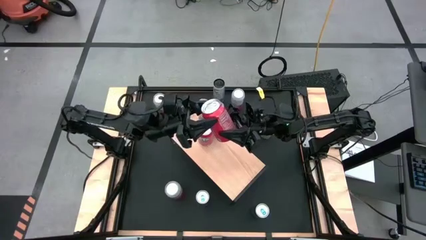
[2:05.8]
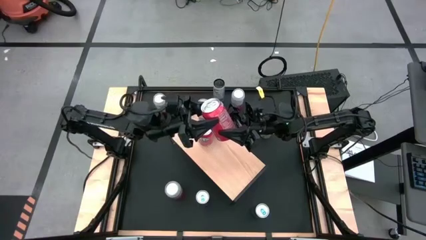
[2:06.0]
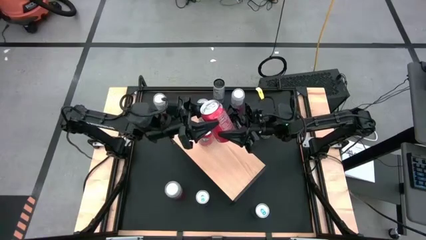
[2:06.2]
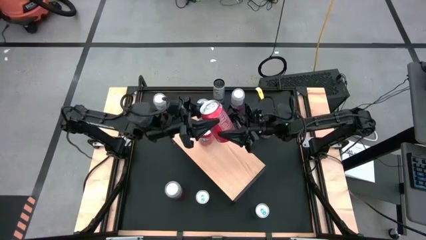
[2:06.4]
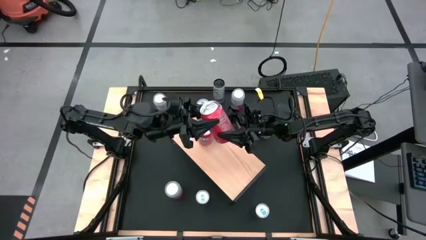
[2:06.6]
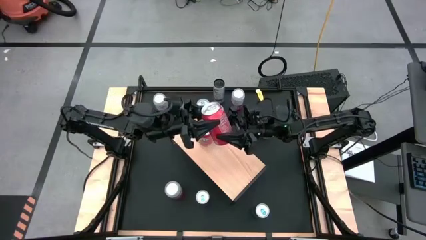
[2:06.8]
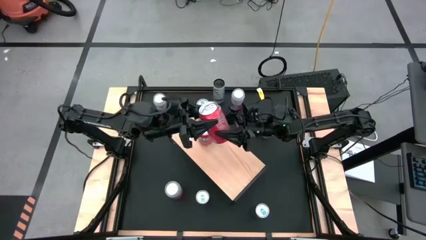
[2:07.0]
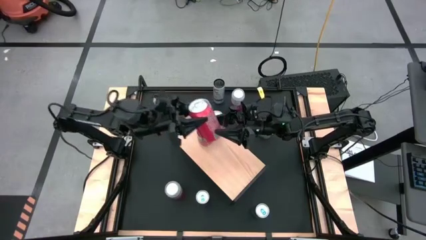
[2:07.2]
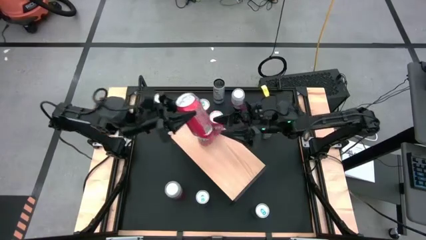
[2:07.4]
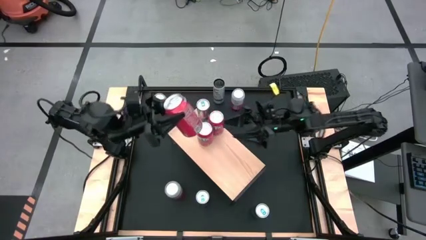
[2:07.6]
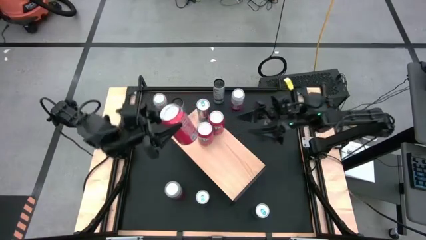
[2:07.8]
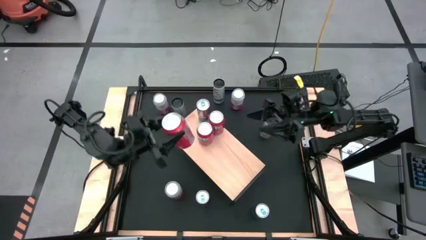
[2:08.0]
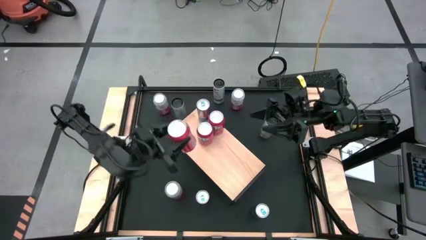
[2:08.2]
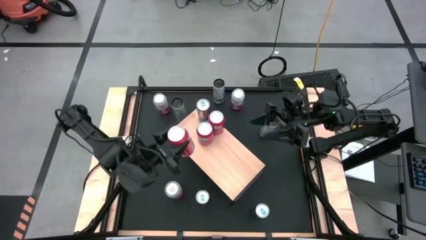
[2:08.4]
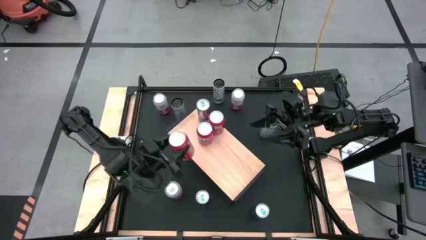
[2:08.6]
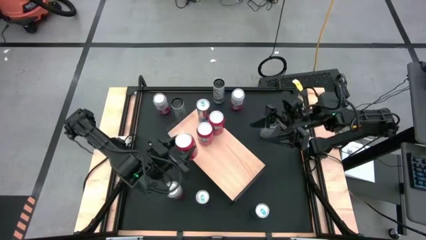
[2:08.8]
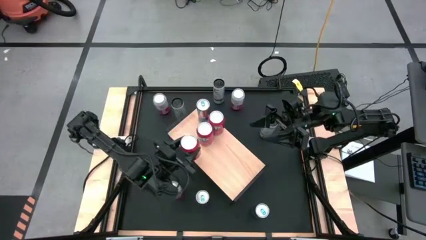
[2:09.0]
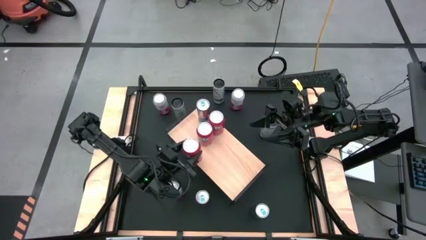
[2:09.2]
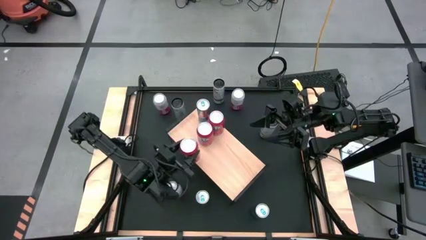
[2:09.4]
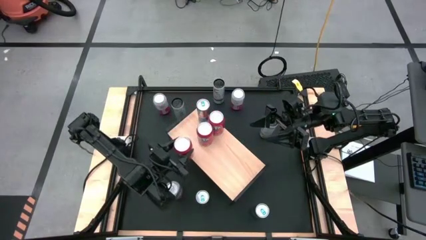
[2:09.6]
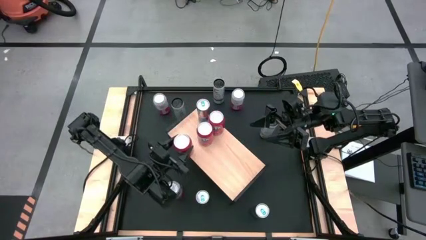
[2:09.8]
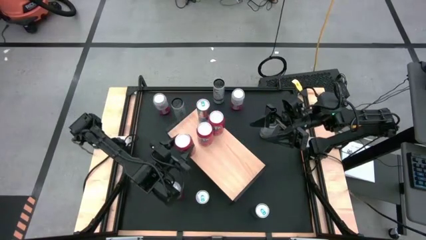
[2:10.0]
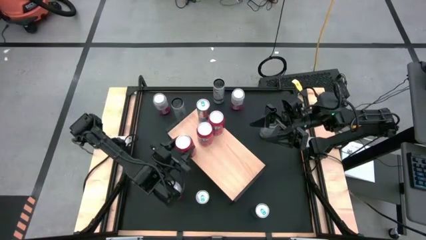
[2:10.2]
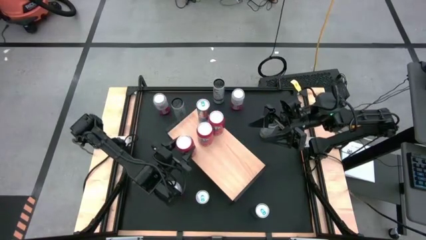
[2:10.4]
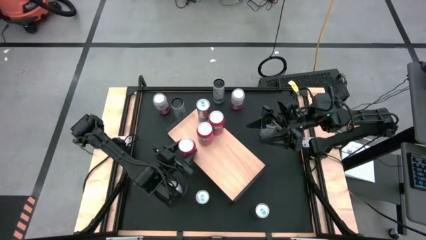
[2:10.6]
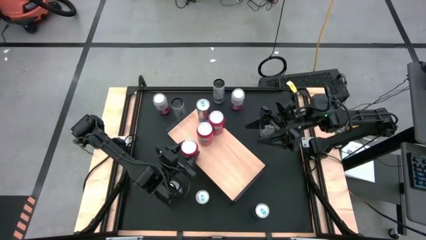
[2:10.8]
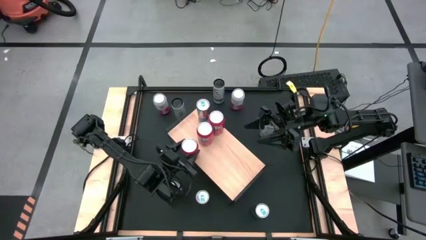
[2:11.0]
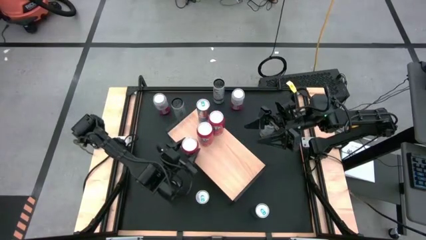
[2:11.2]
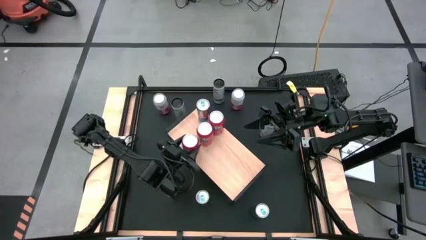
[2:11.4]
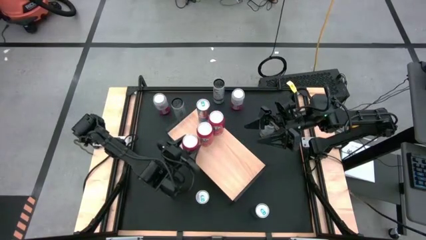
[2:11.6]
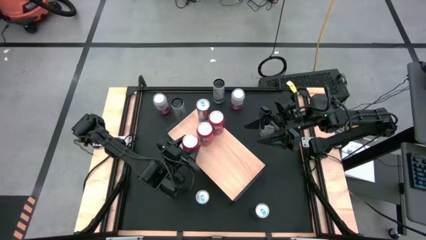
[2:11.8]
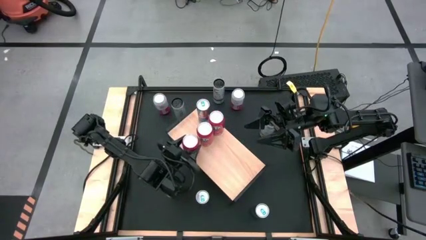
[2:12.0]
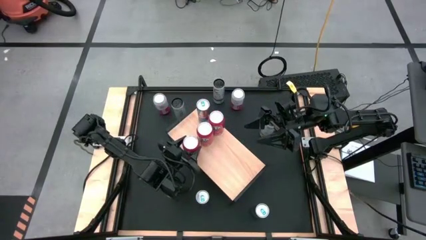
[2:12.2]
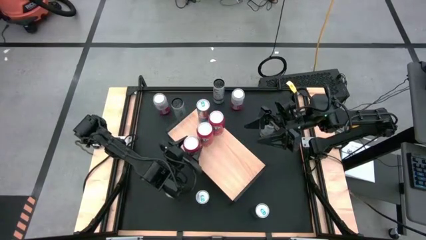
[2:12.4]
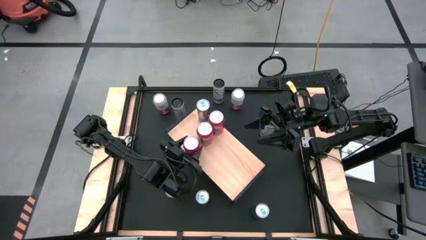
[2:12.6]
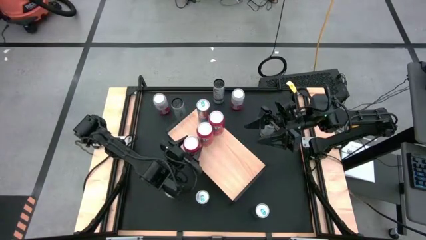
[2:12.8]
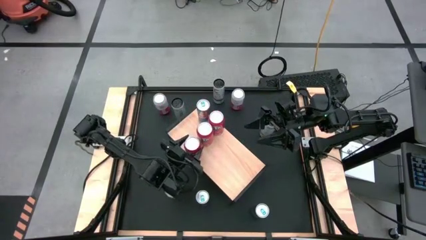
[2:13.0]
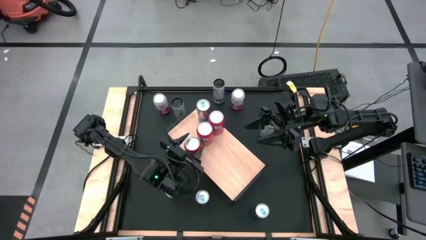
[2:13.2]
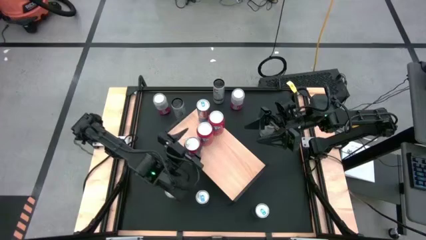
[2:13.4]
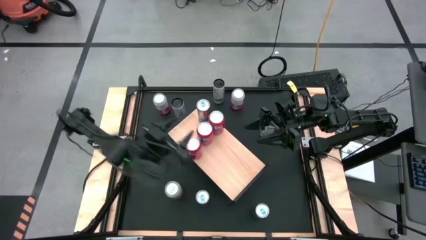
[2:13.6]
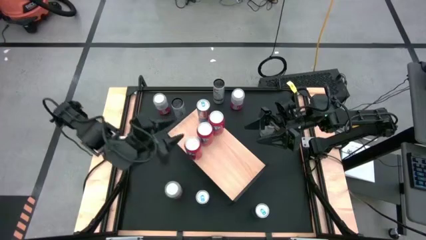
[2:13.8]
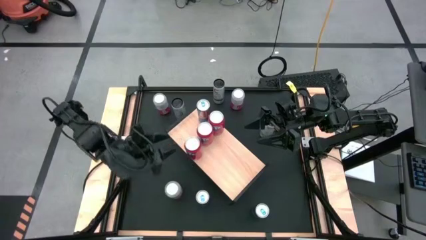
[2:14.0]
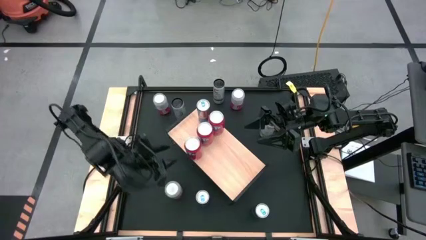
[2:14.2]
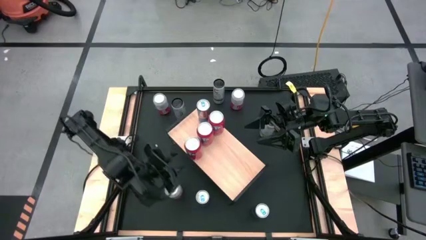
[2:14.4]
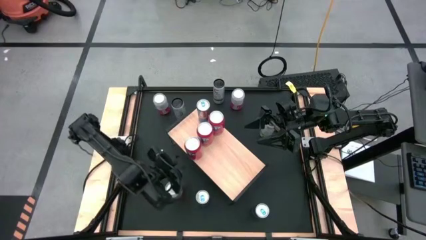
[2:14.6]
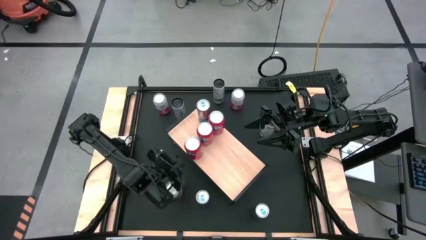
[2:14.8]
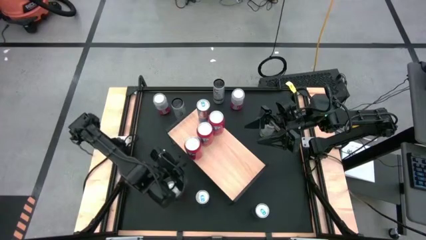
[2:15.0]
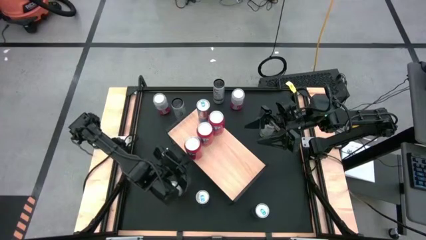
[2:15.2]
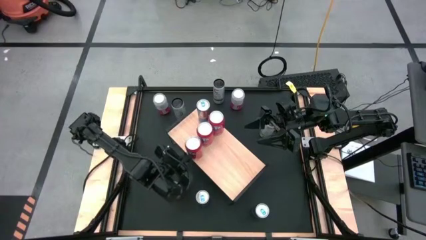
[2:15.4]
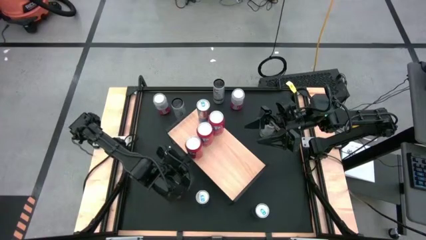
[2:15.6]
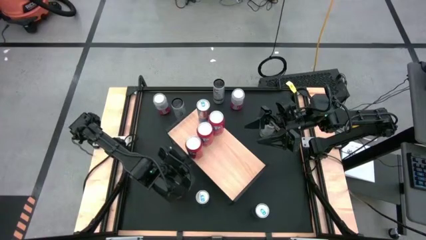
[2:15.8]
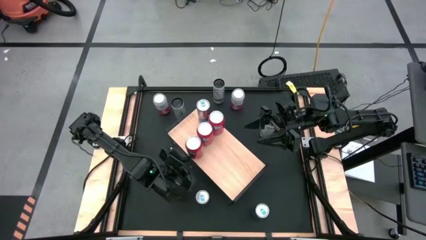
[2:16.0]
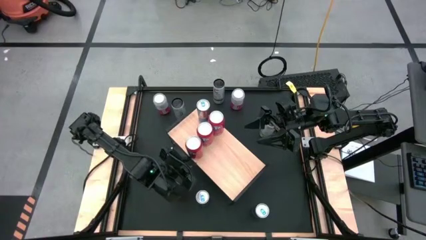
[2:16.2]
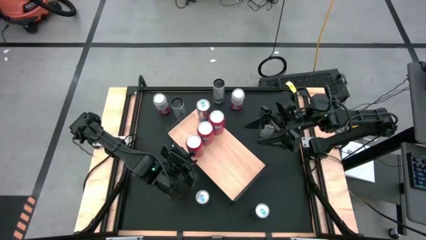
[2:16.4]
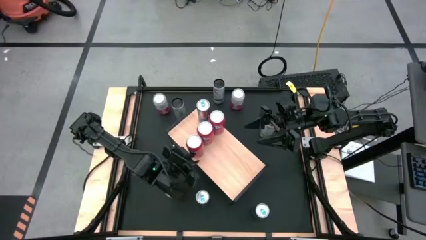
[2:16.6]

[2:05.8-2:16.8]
Task: Place canned beverage on shelf
Put the red soda can on the shelf aligned with the other red soda cans

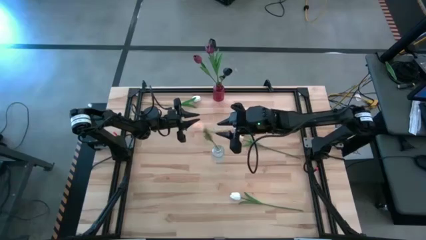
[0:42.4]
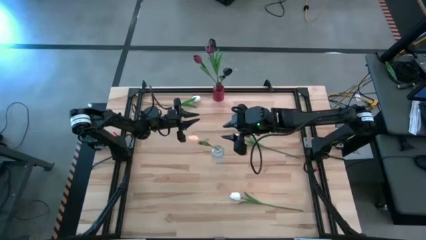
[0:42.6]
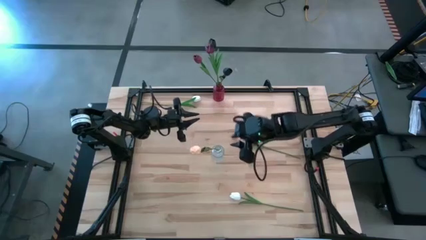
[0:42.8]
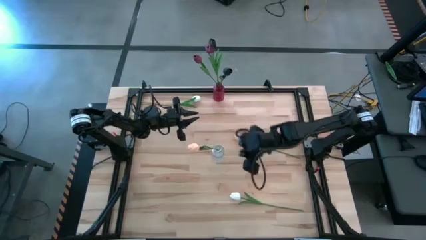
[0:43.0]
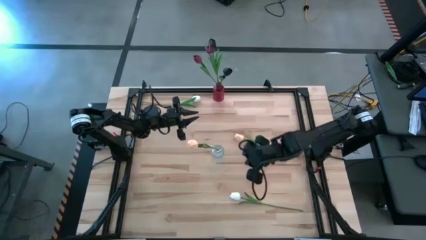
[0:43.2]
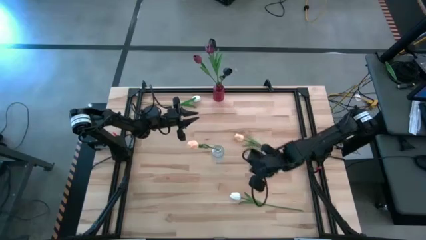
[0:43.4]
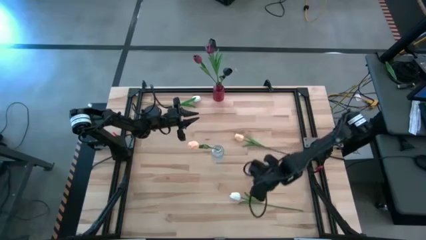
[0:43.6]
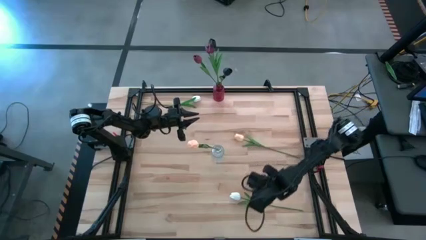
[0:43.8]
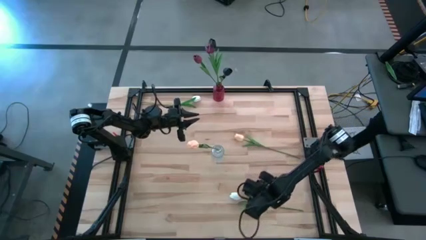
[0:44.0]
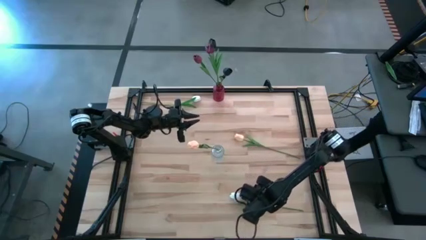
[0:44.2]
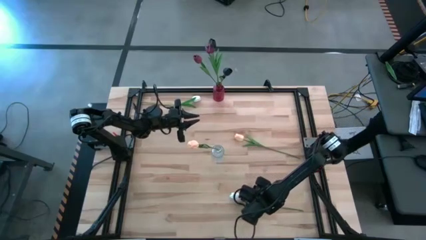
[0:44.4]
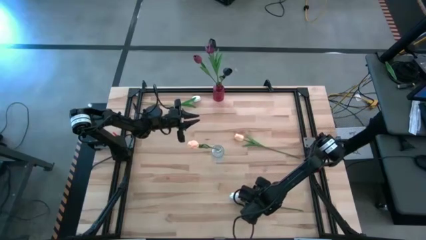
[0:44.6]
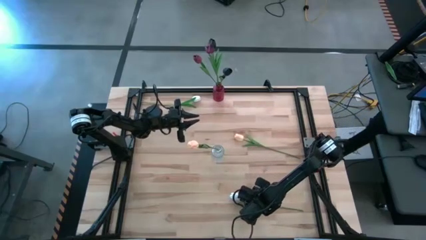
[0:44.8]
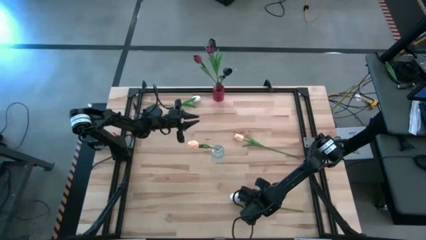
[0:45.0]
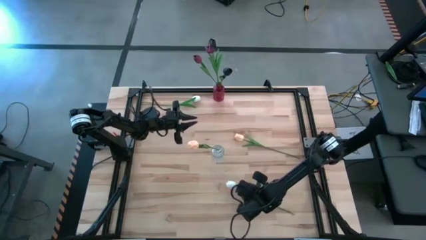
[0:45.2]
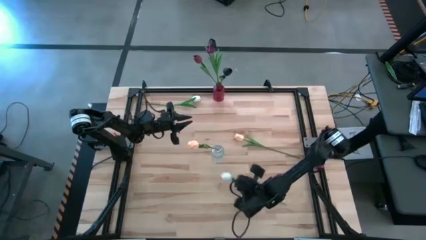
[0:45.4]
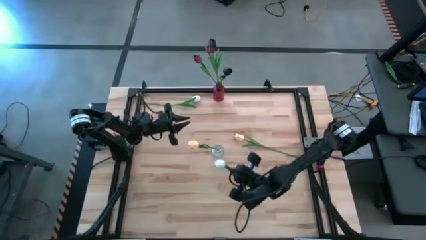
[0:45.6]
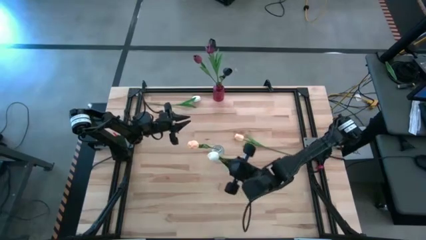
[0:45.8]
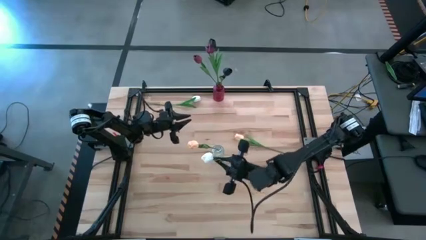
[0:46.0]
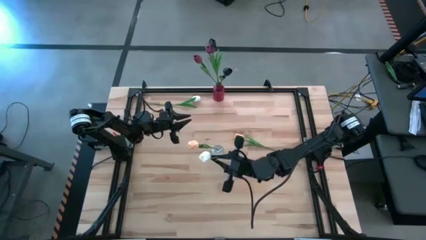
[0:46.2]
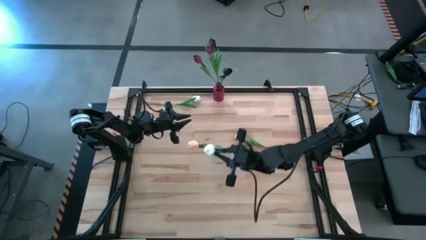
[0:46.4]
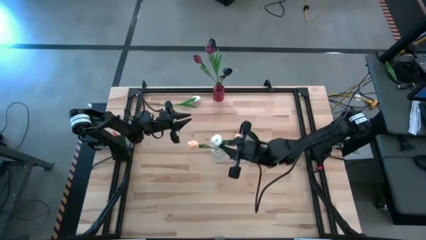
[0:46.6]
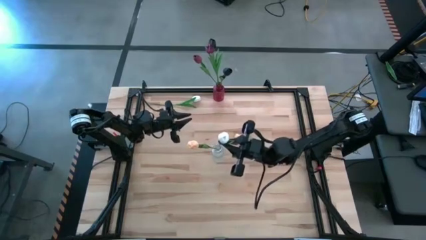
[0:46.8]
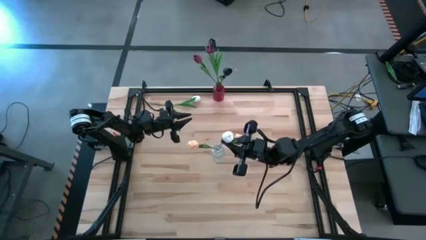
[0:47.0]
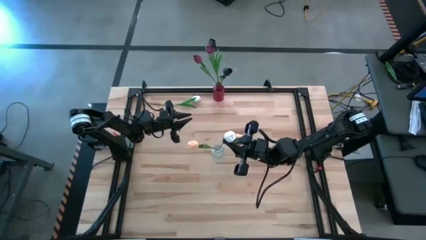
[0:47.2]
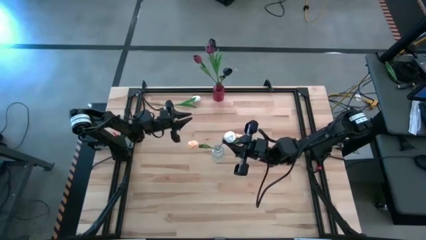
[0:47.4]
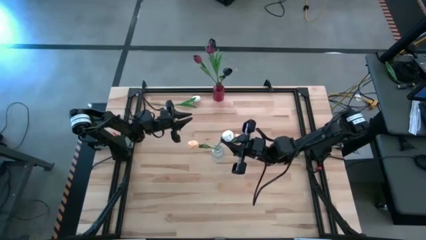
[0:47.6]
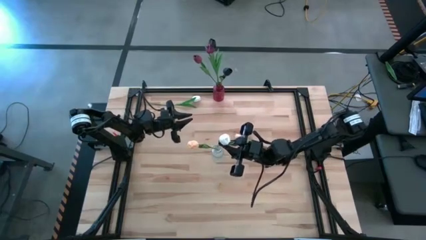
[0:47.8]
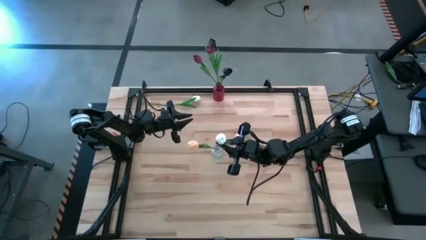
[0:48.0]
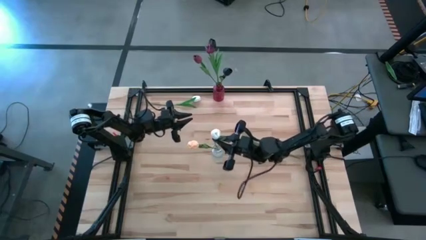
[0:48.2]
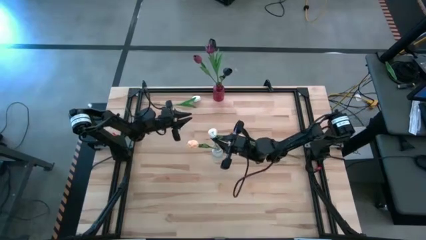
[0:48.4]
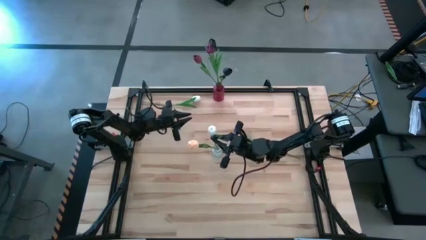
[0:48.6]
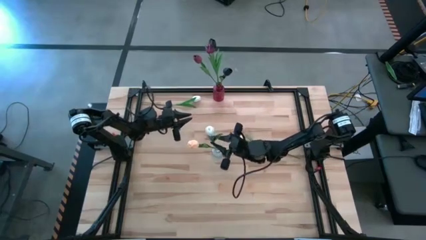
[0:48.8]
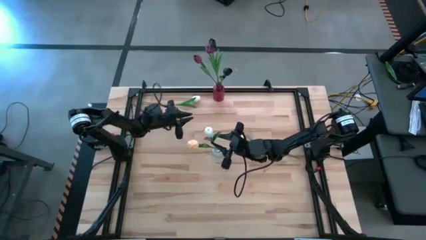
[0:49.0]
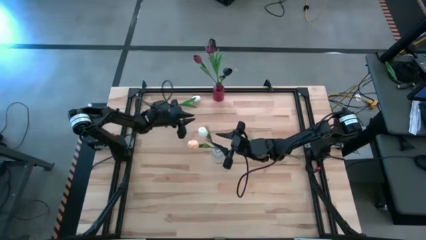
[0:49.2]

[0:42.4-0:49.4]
Task: Sort flowers into vase by color
Put the bottom white tulip into the transparent vase
